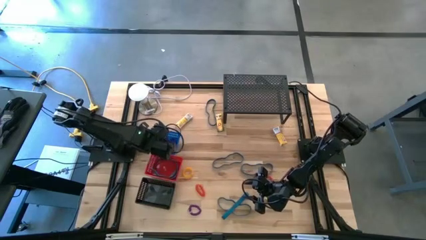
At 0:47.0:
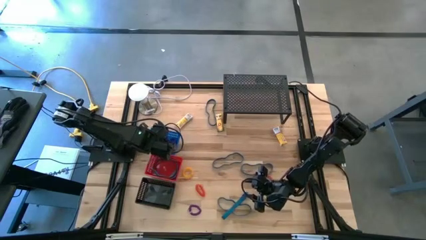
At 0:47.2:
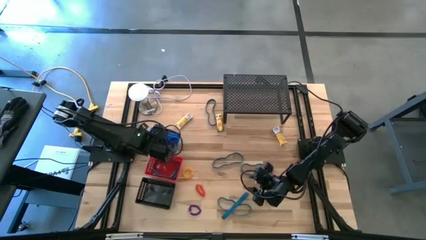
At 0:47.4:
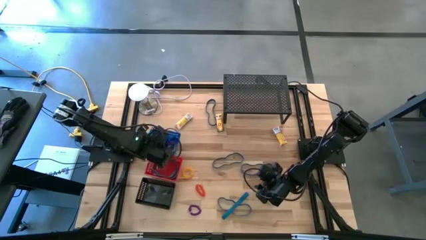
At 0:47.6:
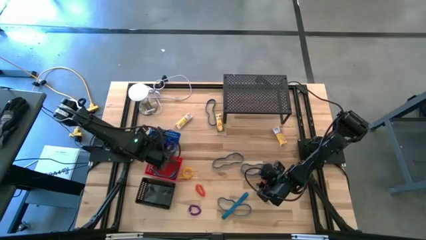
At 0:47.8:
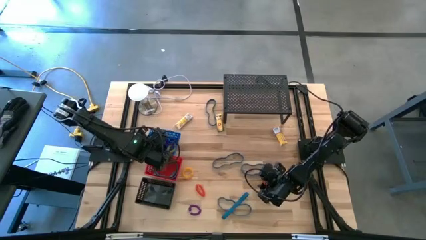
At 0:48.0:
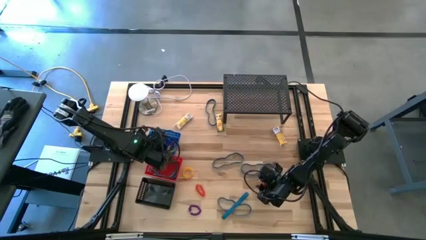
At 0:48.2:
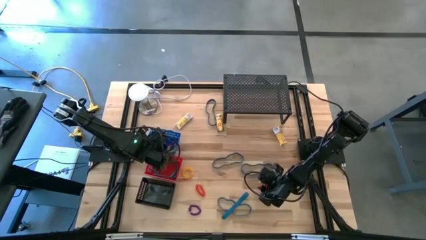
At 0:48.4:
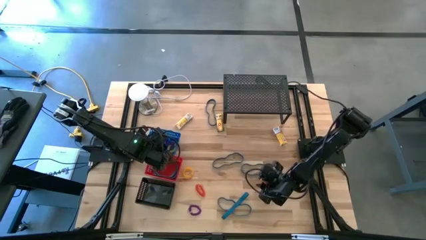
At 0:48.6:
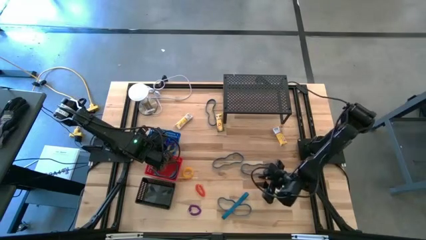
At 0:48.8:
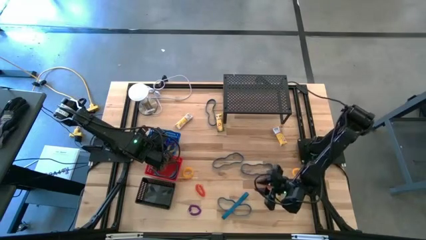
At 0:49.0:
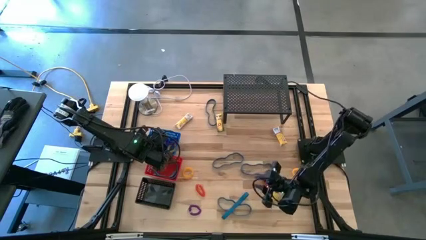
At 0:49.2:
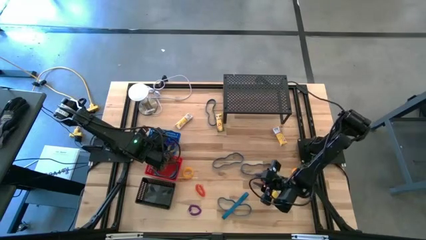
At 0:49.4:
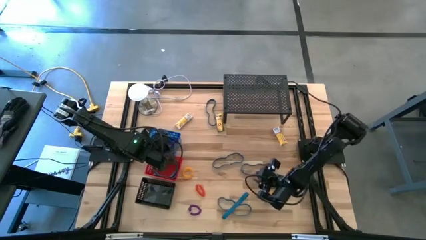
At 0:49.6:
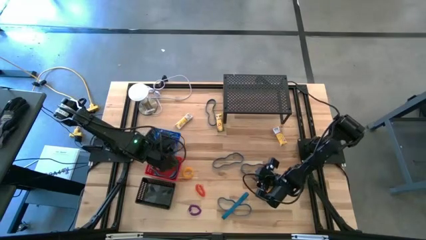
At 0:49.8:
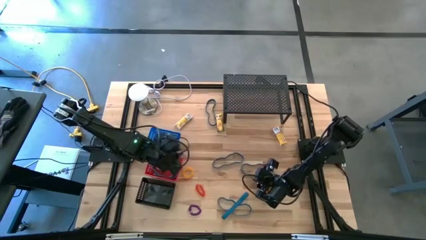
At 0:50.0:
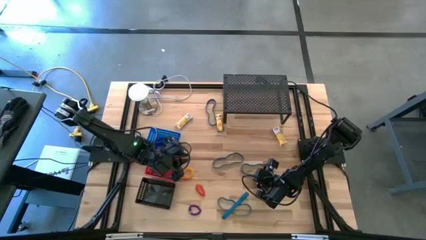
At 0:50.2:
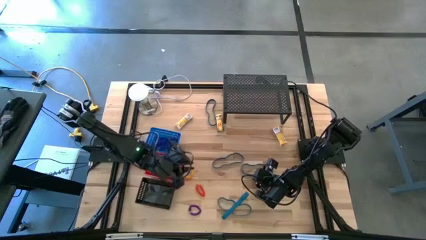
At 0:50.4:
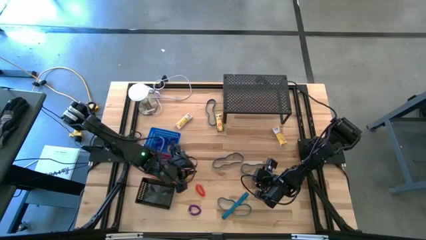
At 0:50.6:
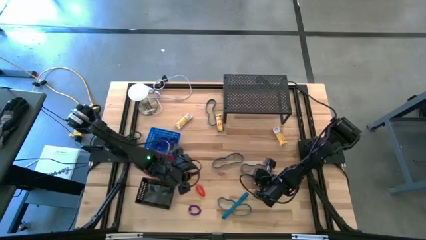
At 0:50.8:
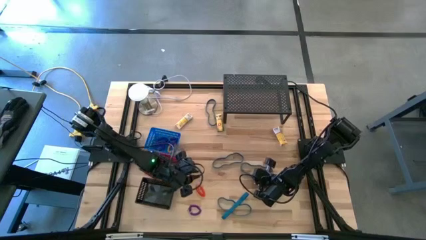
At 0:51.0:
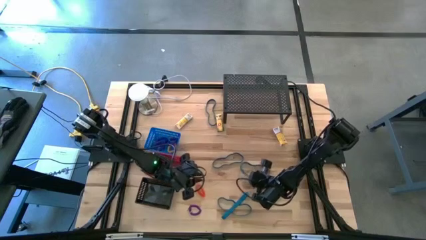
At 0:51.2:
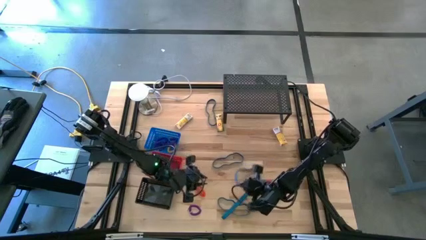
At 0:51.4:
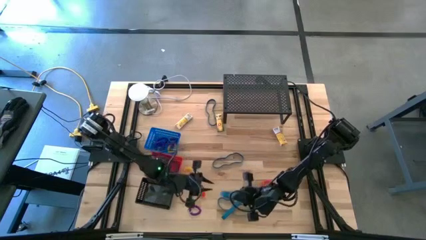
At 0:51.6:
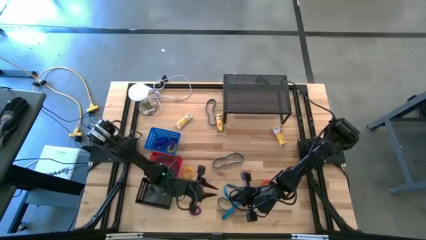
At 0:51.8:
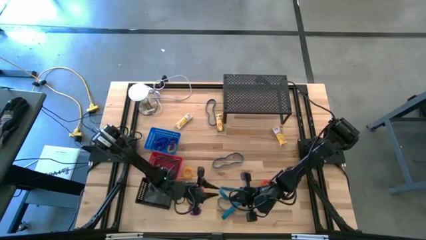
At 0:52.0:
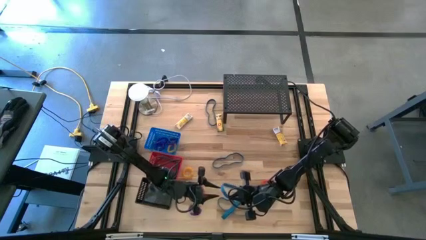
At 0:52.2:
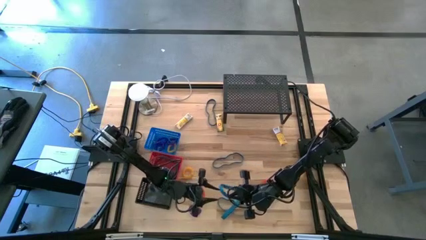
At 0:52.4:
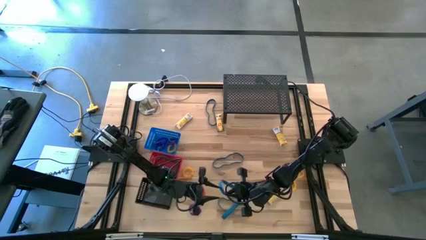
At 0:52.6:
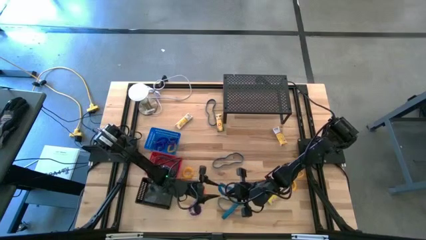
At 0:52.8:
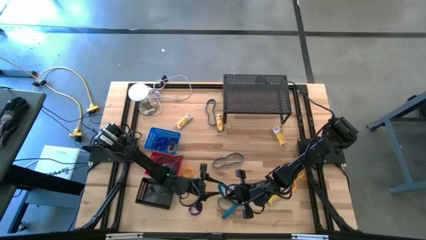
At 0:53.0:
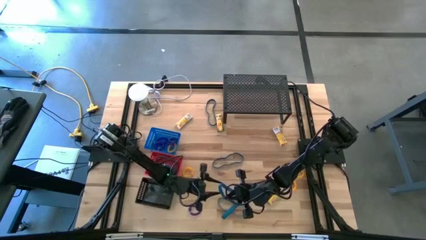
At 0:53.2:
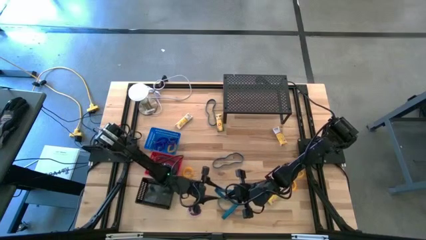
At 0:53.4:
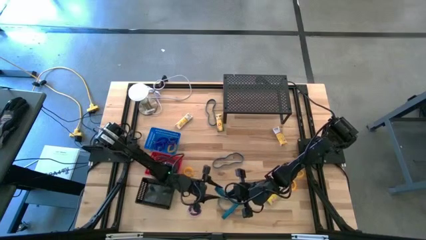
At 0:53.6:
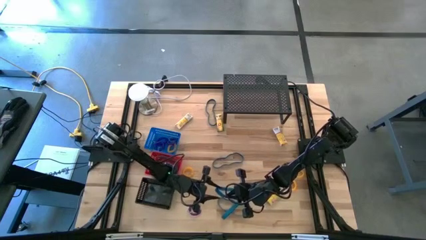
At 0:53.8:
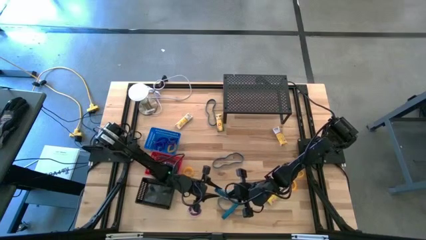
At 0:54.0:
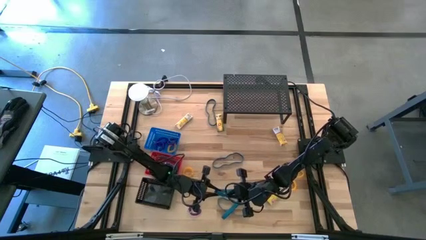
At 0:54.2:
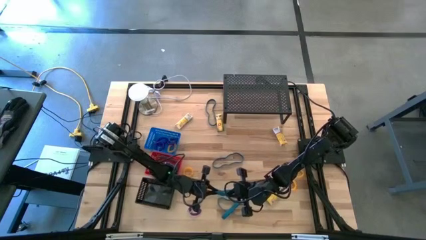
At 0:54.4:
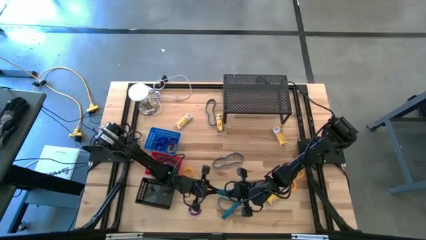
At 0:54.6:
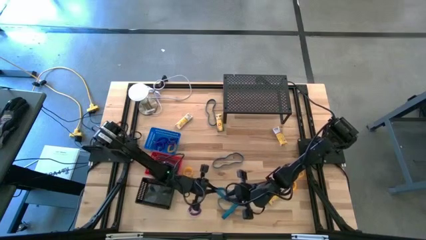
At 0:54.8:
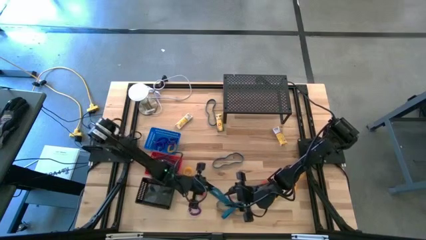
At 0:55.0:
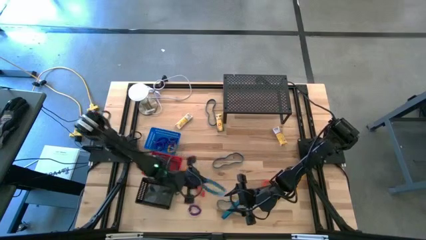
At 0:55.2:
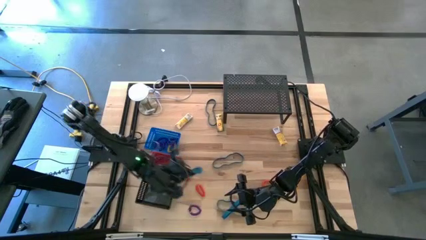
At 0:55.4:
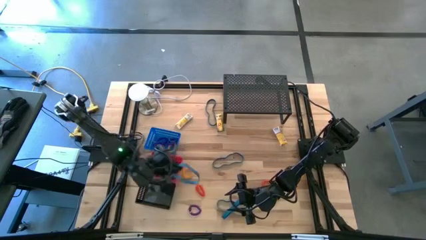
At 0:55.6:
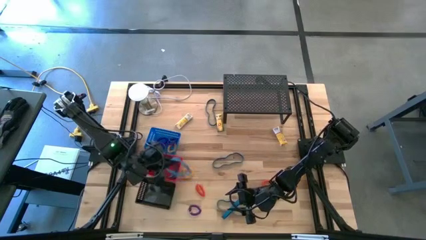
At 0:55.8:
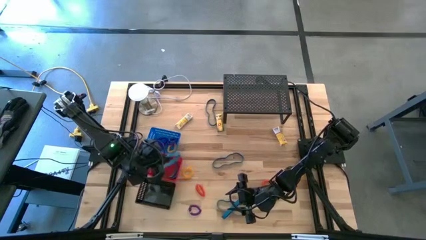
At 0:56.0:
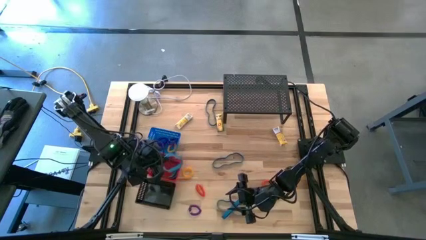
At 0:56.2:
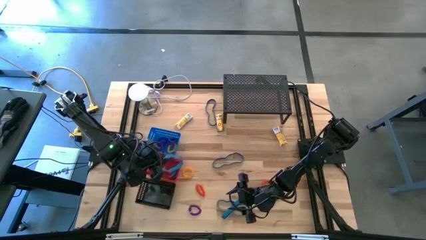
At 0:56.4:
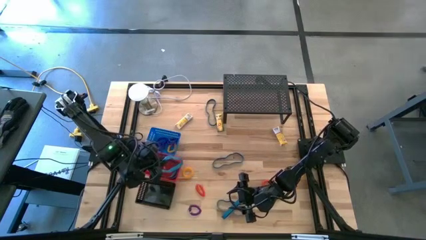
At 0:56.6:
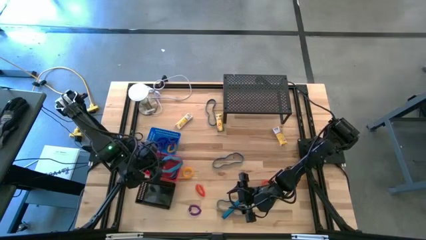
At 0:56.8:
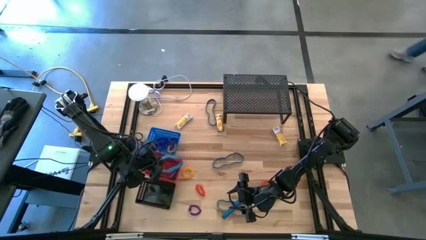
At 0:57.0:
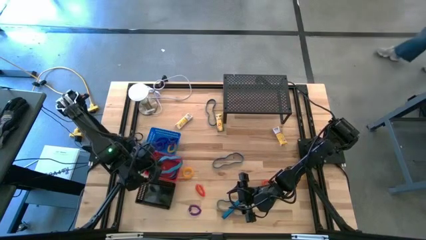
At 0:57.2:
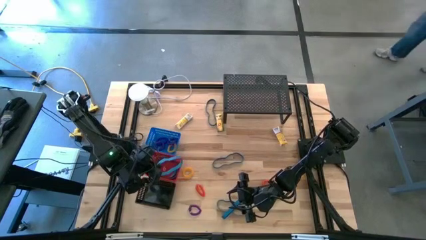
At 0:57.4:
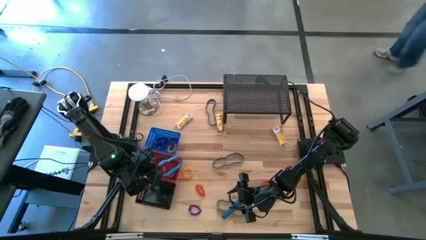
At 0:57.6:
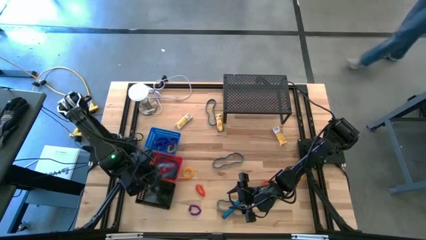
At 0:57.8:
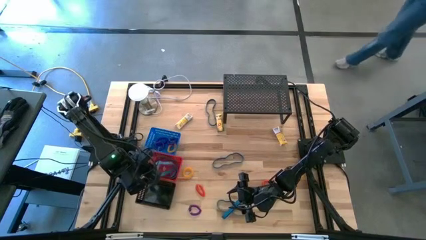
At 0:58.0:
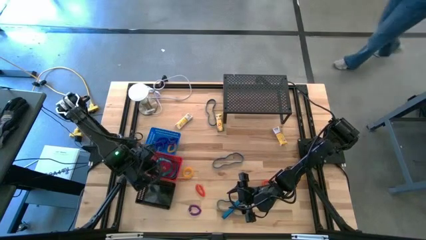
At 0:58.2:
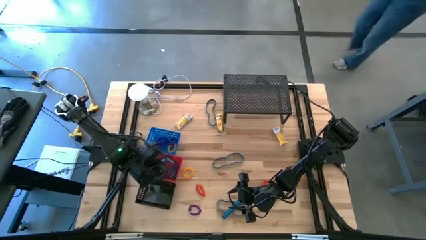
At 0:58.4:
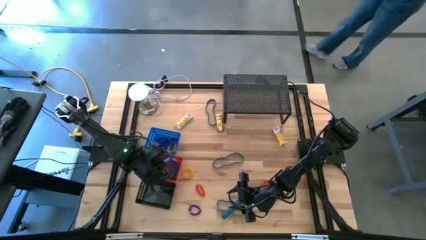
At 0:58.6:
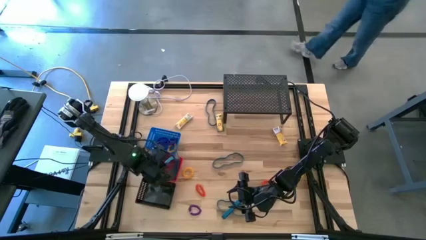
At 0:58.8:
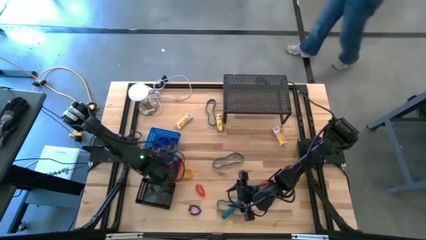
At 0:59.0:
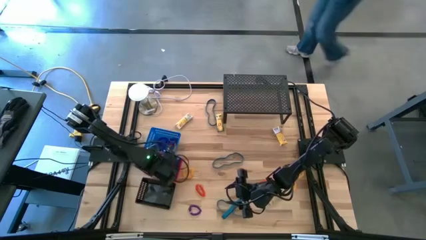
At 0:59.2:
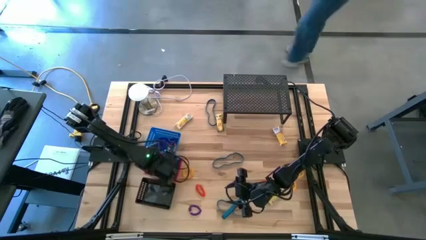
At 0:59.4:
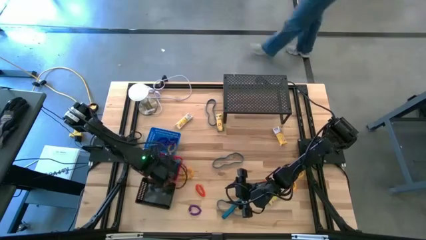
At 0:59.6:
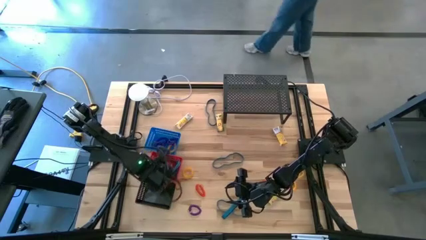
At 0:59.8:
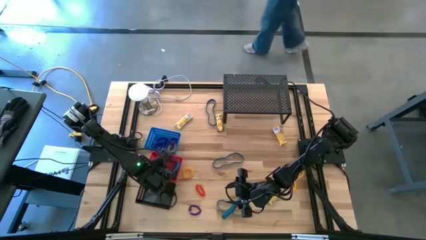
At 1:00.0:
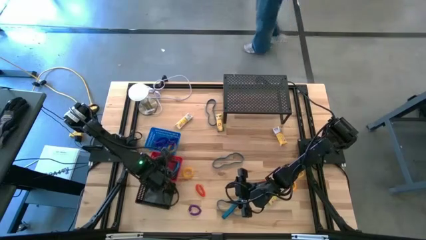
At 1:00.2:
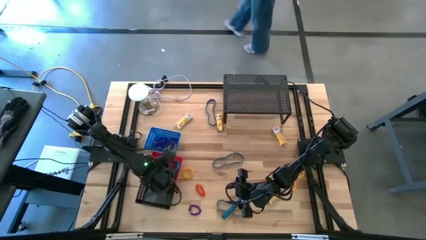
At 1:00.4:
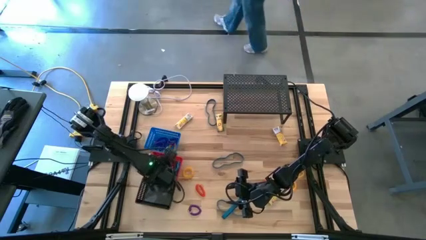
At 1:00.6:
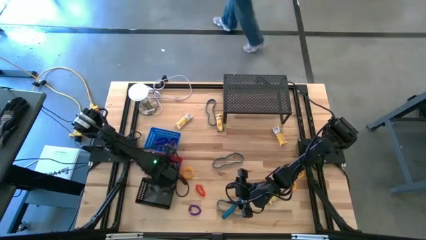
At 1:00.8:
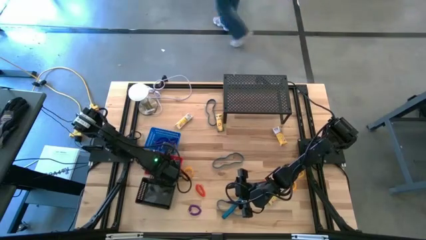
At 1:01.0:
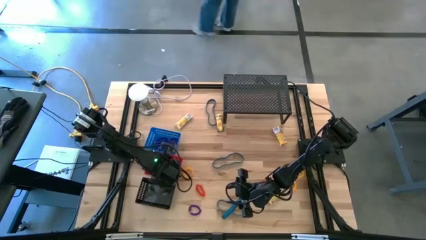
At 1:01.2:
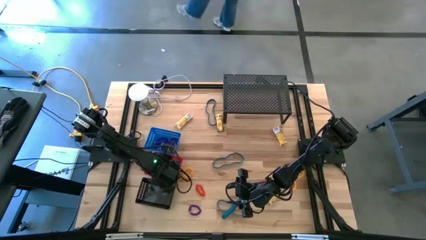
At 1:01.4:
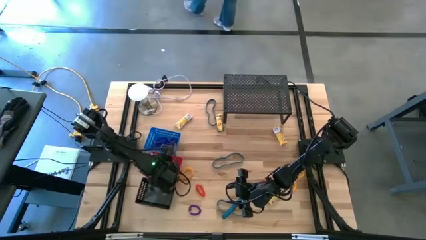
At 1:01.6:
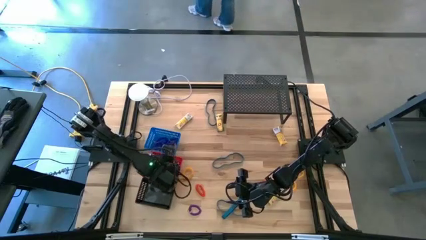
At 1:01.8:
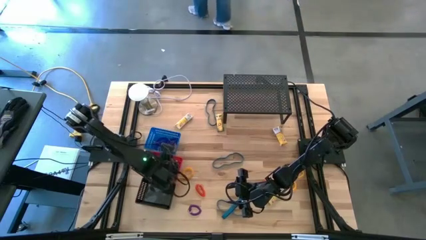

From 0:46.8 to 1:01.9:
Task: Pick & Place Office Desk Supplies
Put the blue rubber band into the bin
